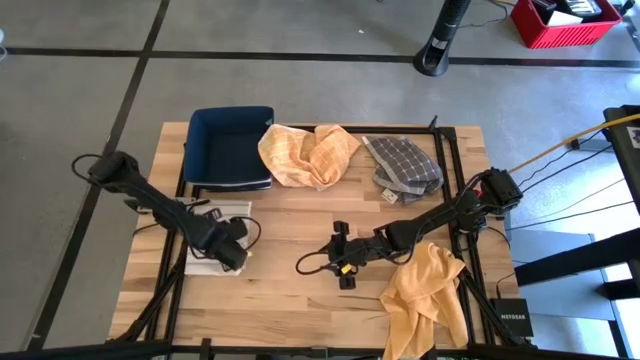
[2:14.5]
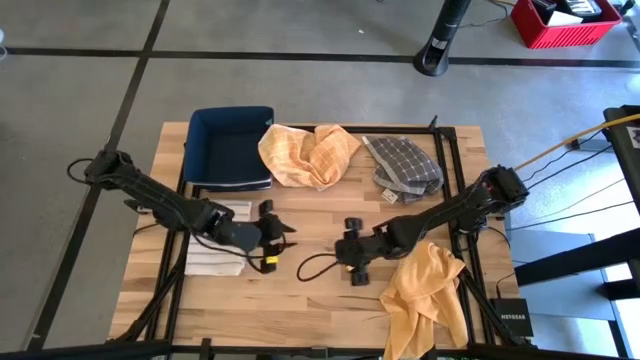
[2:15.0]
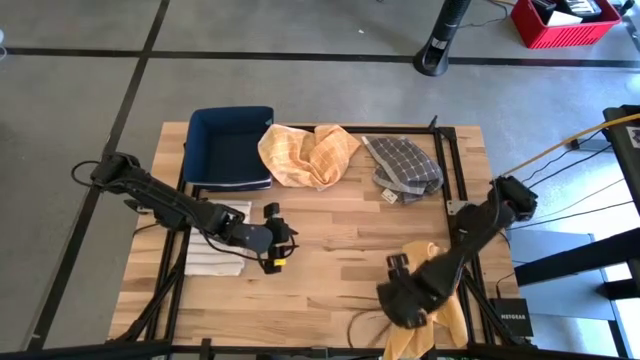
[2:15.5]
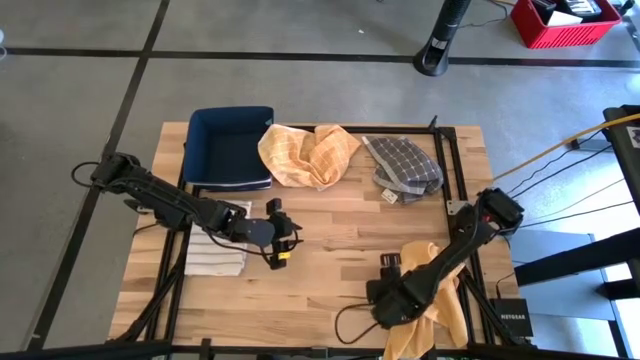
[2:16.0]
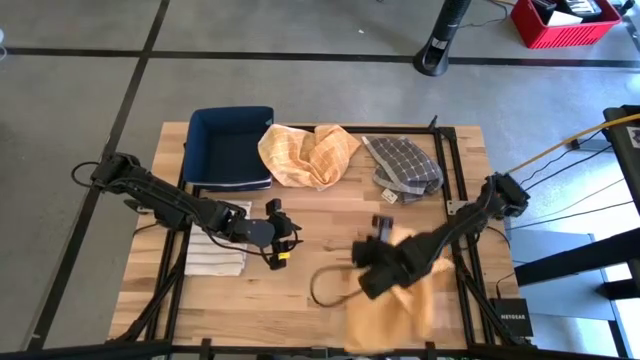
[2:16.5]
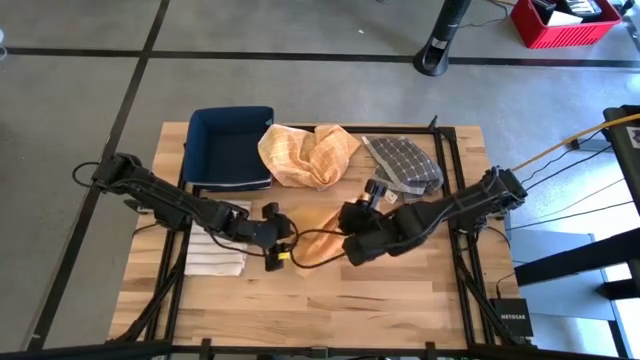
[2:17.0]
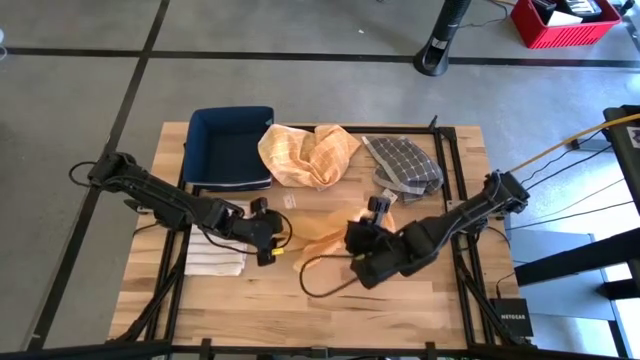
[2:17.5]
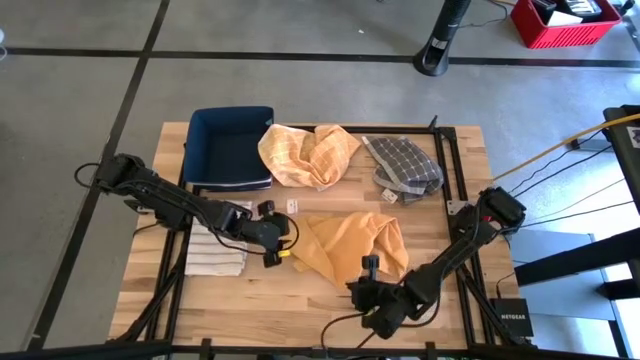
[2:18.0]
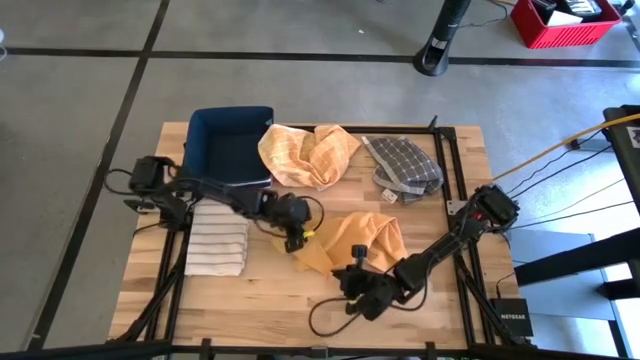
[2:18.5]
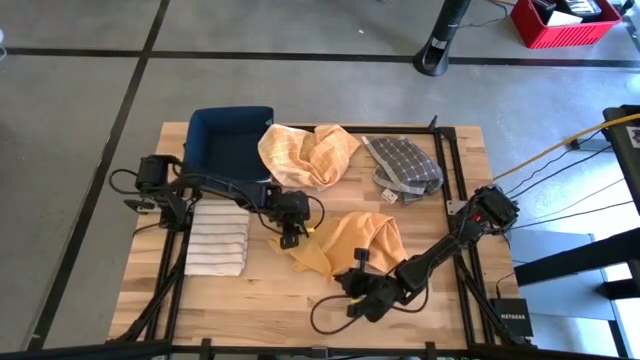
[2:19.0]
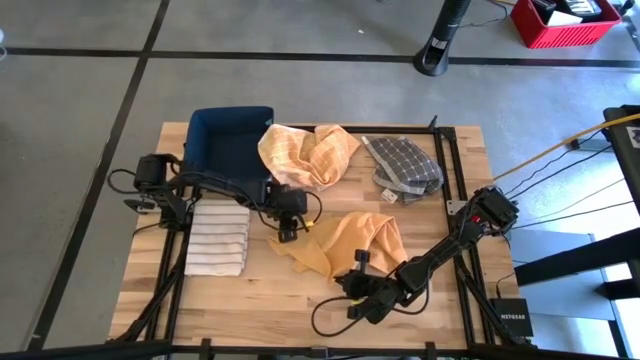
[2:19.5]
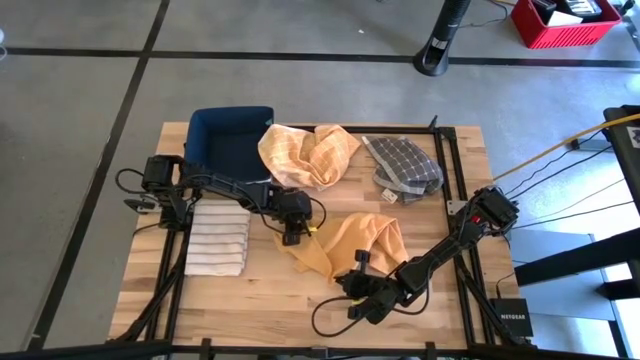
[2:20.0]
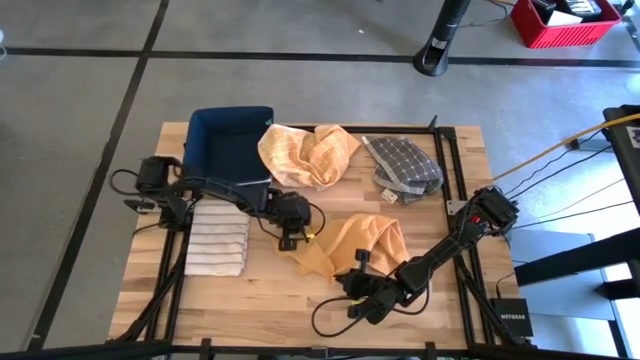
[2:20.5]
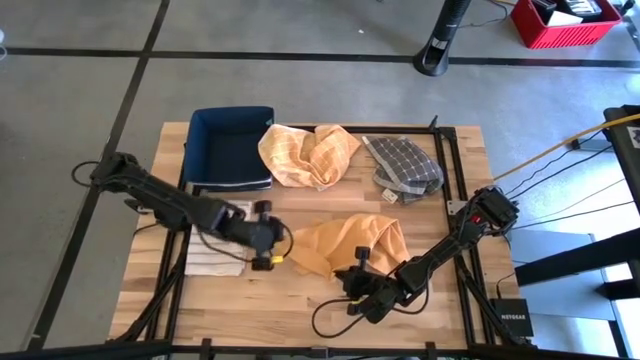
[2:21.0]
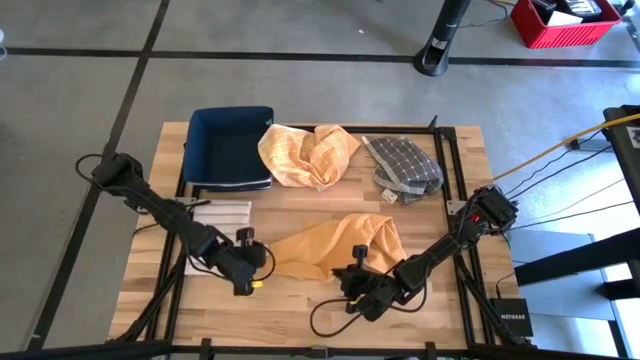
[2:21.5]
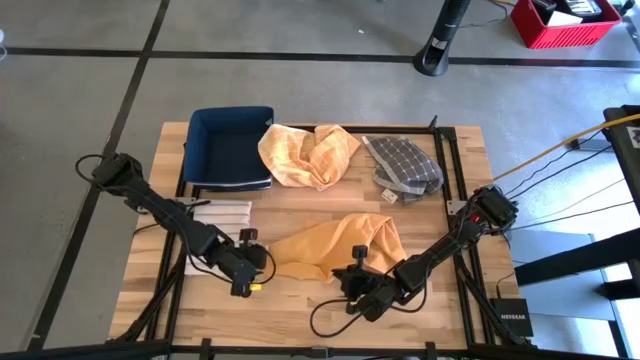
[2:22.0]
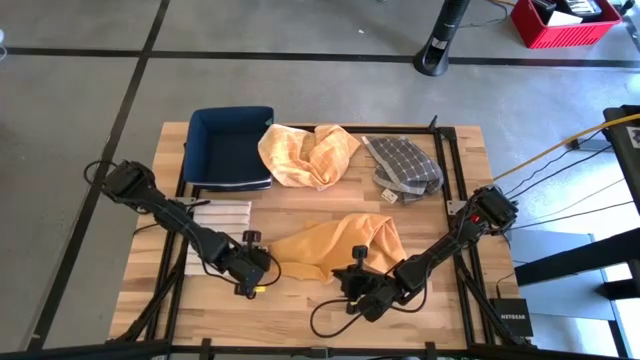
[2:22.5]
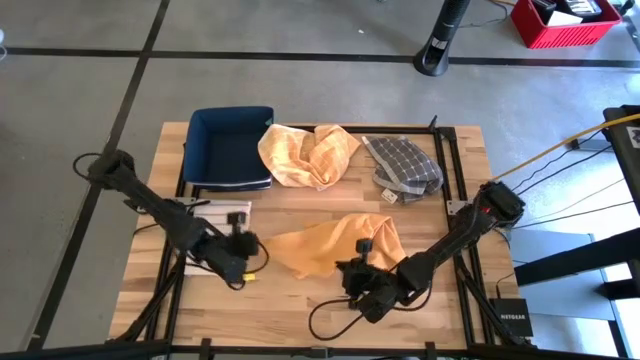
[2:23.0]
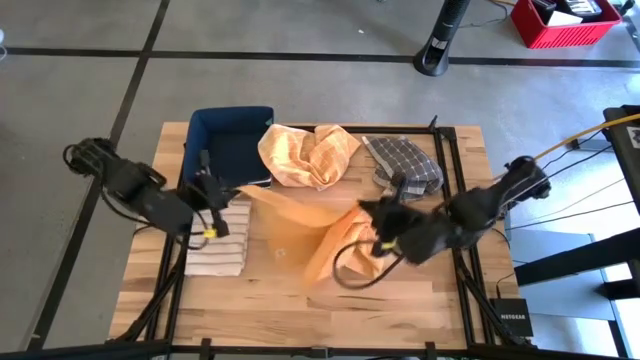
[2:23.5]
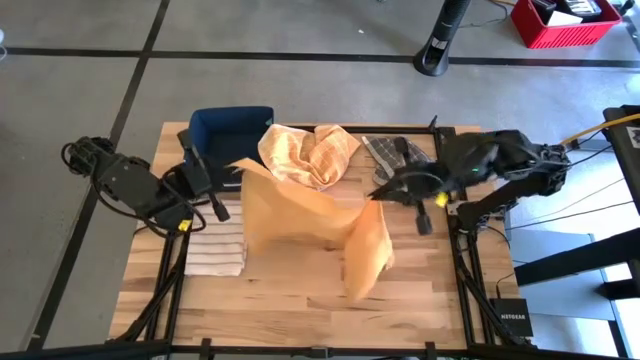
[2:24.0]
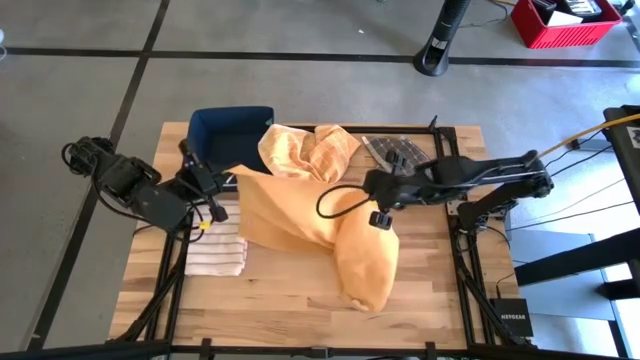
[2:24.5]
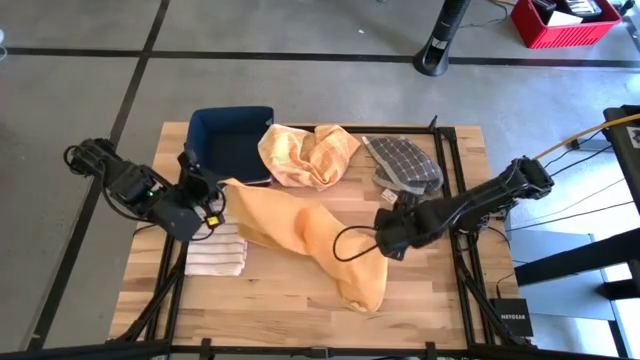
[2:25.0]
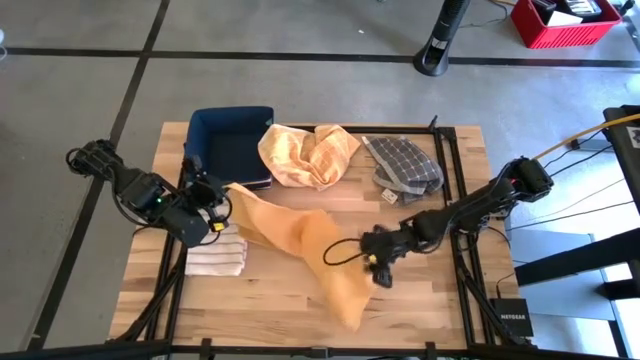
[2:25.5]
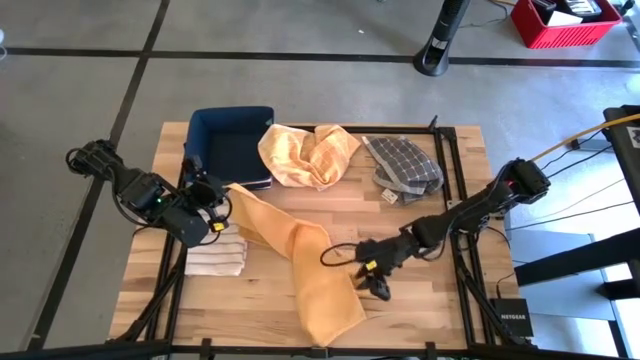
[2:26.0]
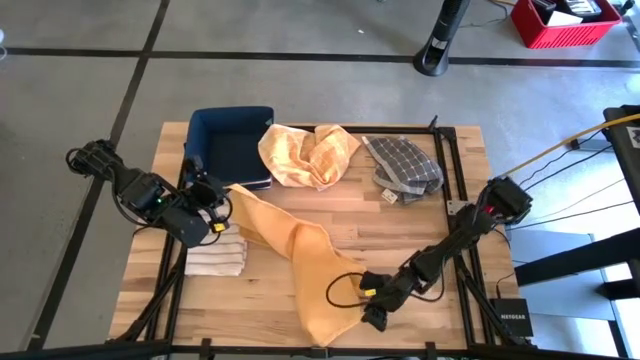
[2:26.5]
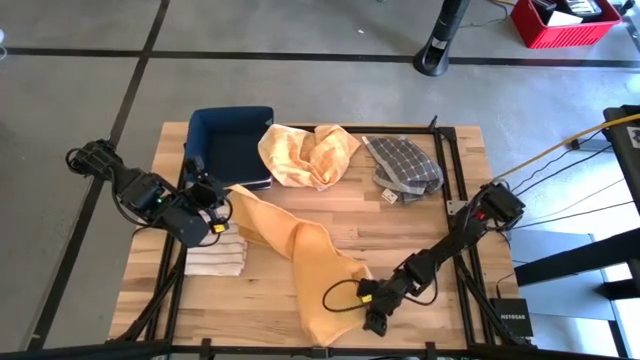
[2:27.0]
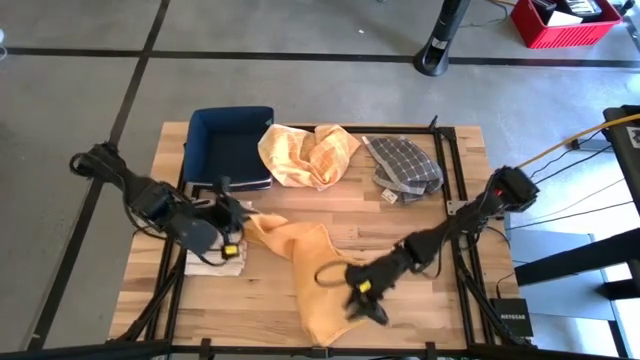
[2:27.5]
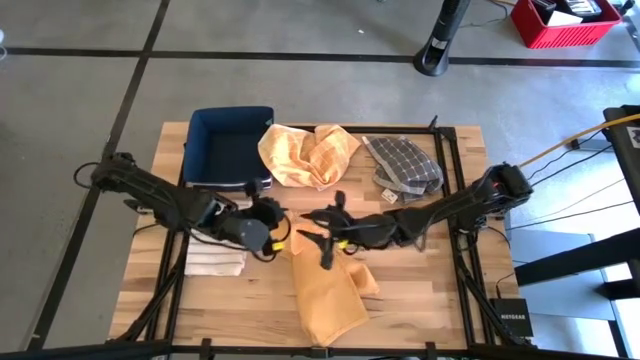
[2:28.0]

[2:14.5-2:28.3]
Task: Fold towel
Fold the orange towel

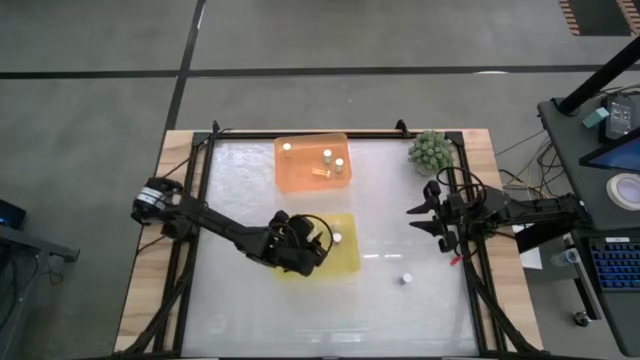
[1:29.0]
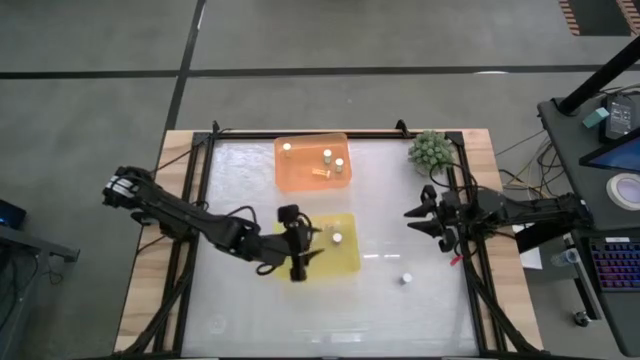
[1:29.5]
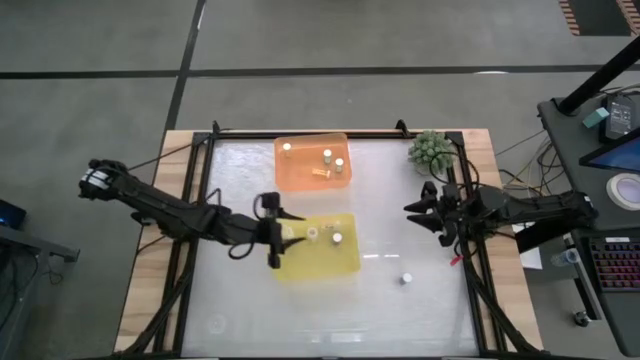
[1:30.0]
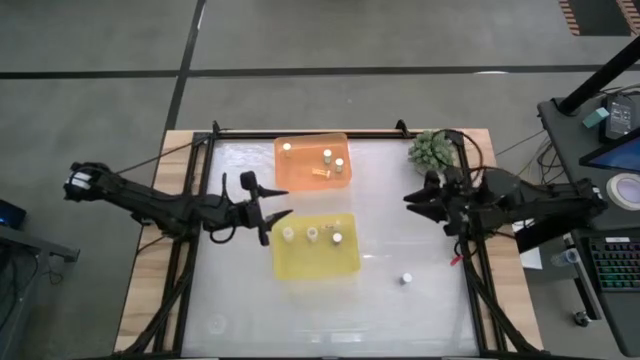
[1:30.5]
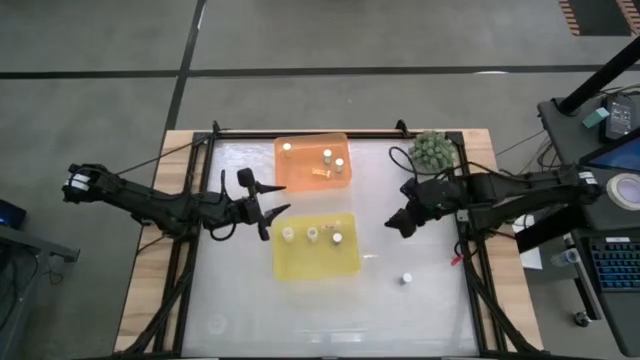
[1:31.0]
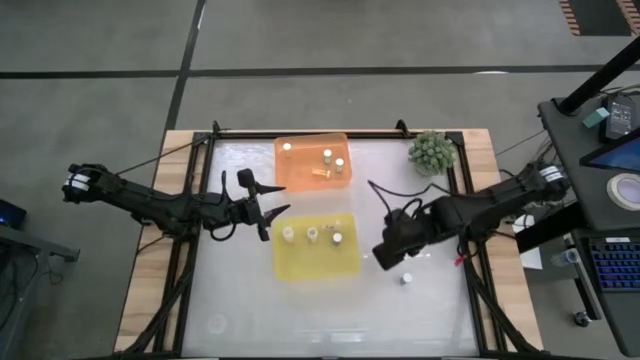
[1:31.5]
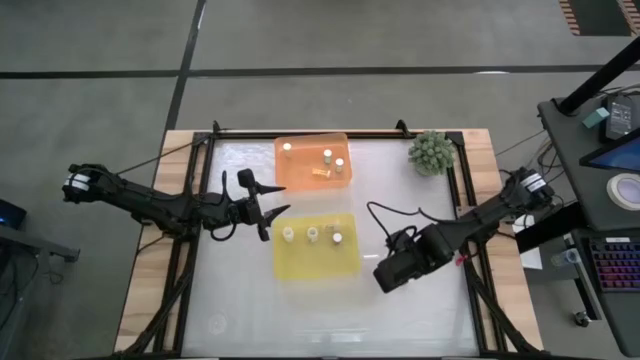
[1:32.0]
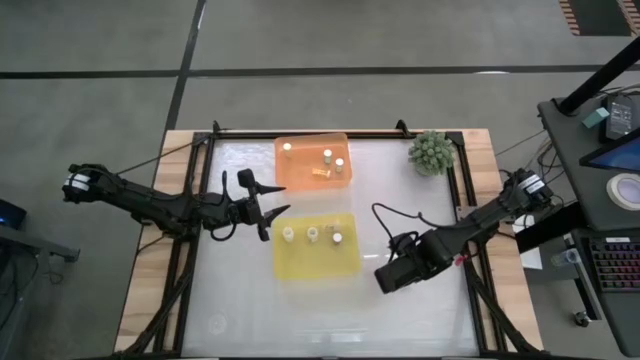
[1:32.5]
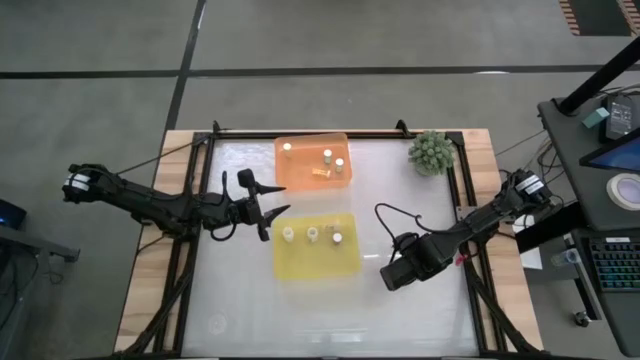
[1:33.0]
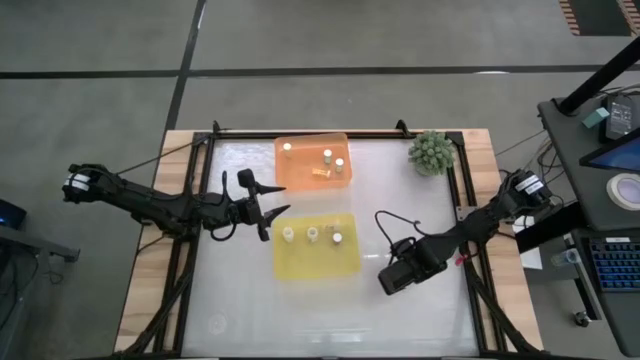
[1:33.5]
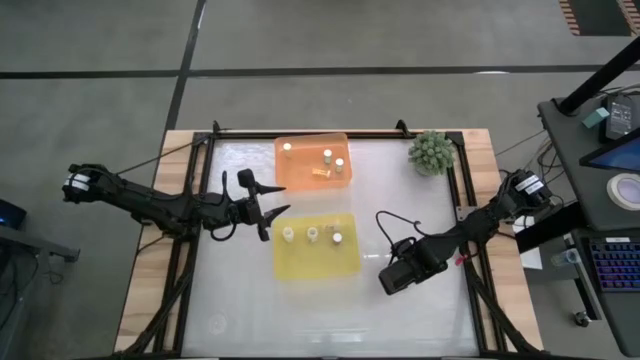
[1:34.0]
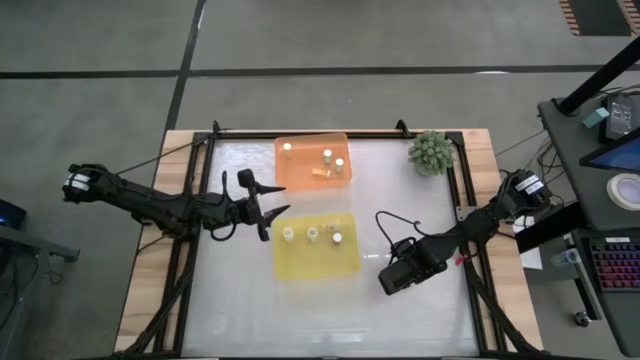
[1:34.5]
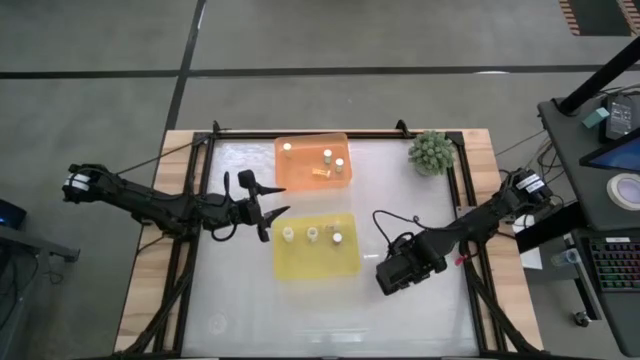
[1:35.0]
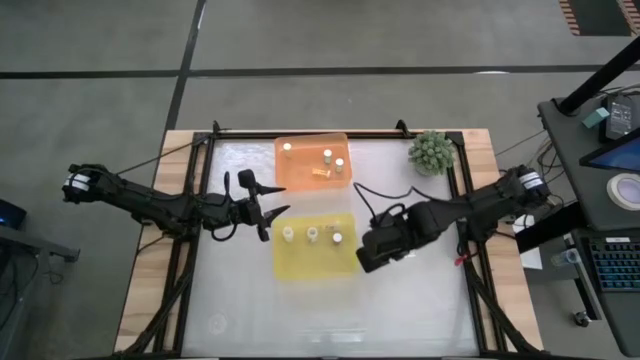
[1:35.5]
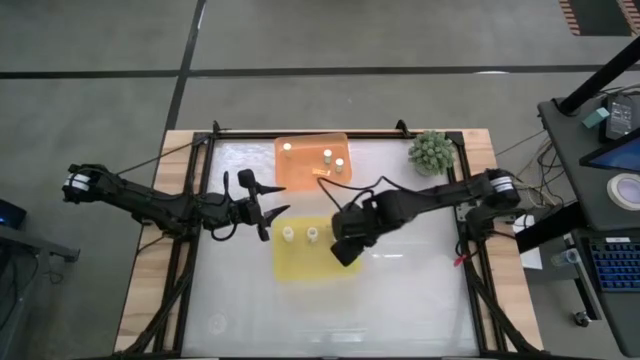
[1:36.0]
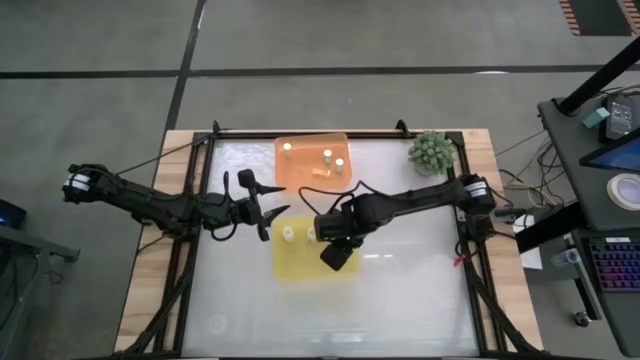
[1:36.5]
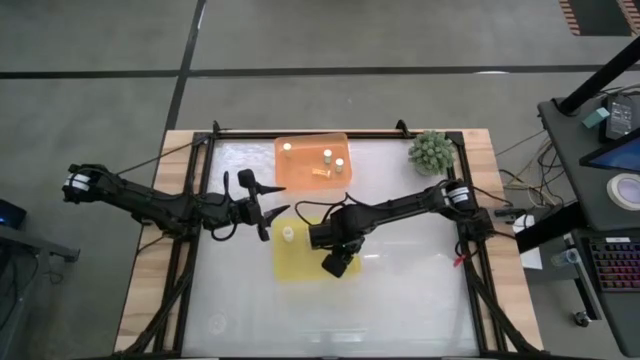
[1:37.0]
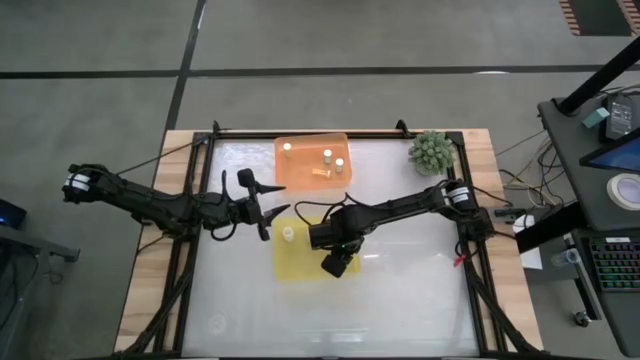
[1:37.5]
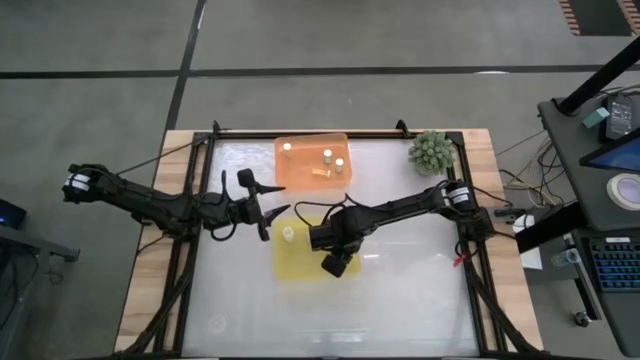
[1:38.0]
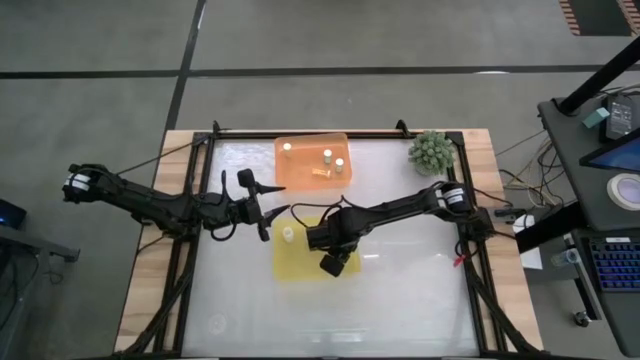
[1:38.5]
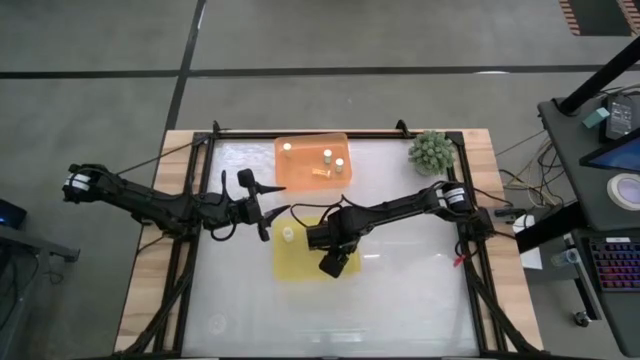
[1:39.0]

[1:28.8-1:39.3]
Task: Pick and place medicine bottles into bin by pill shape (circle, oval)
Put the blue capsule bottle into the yellow bin
